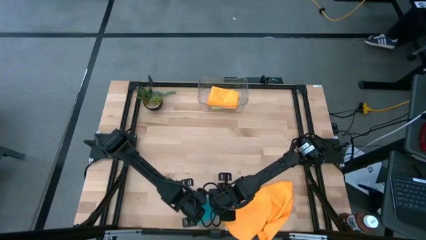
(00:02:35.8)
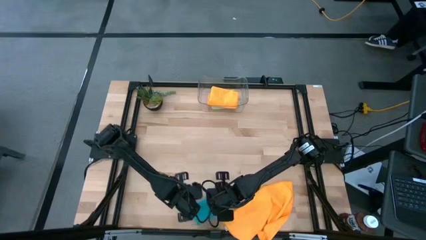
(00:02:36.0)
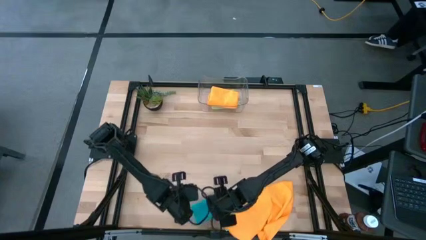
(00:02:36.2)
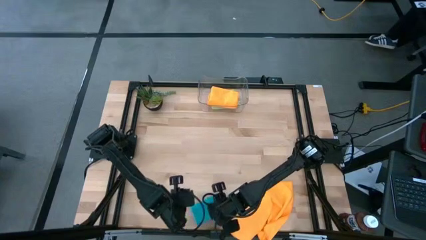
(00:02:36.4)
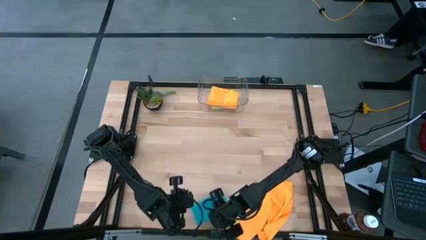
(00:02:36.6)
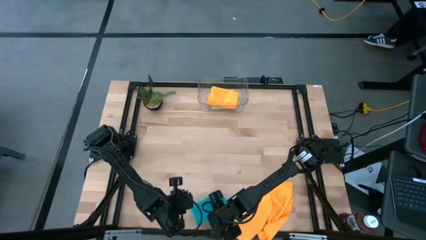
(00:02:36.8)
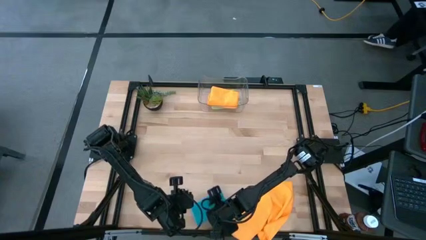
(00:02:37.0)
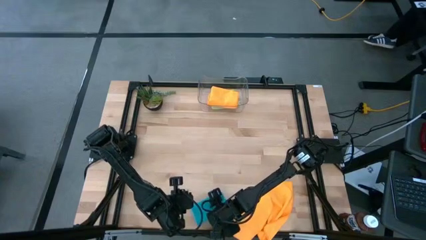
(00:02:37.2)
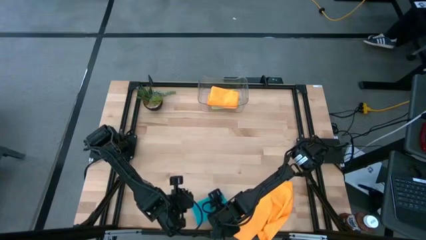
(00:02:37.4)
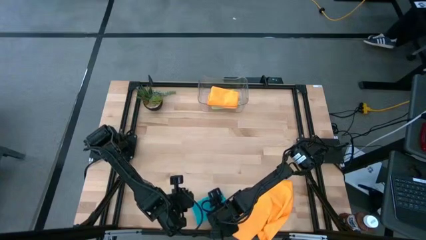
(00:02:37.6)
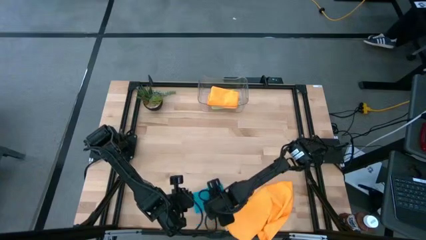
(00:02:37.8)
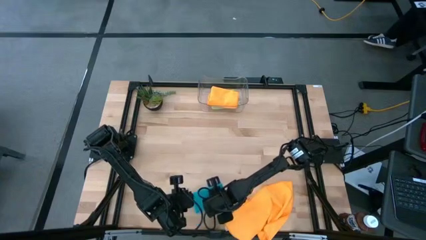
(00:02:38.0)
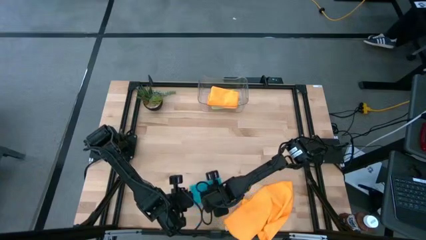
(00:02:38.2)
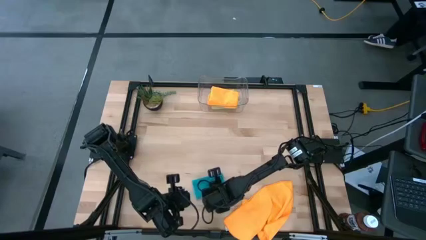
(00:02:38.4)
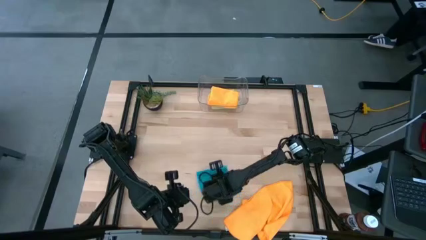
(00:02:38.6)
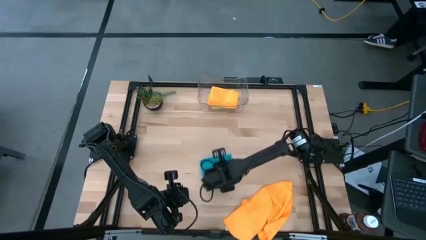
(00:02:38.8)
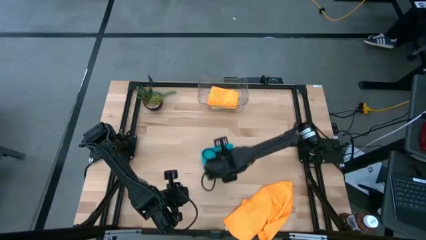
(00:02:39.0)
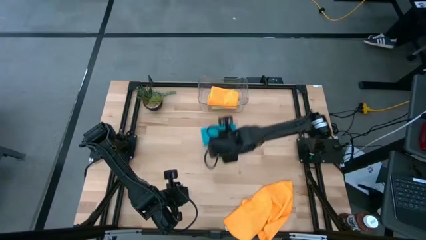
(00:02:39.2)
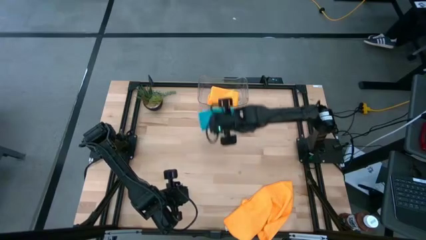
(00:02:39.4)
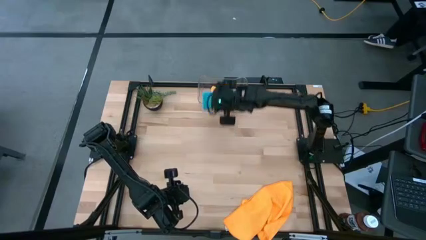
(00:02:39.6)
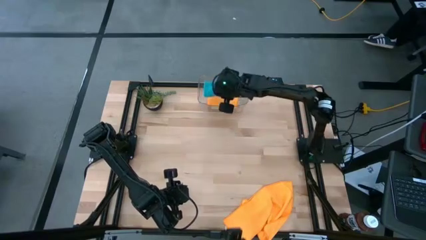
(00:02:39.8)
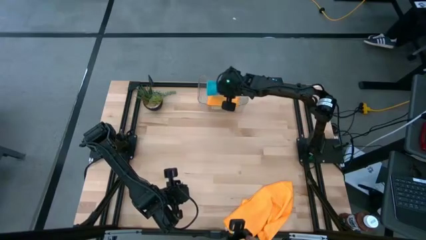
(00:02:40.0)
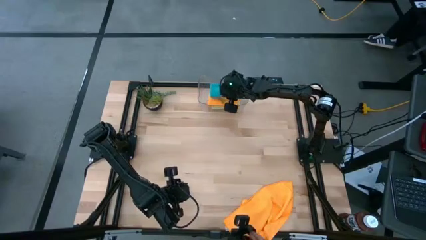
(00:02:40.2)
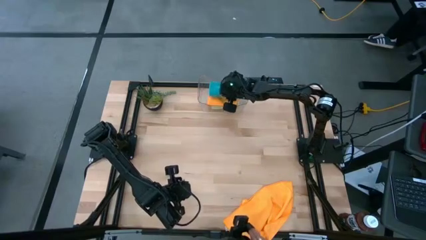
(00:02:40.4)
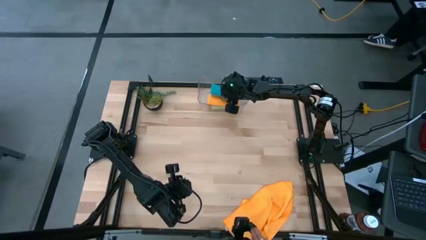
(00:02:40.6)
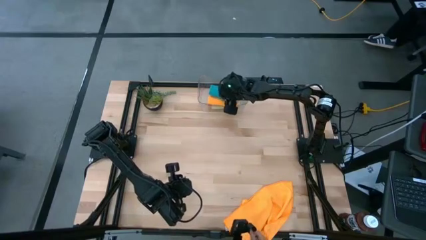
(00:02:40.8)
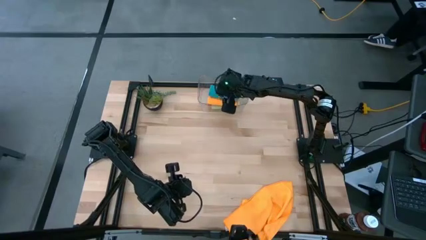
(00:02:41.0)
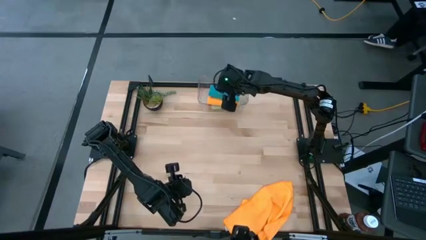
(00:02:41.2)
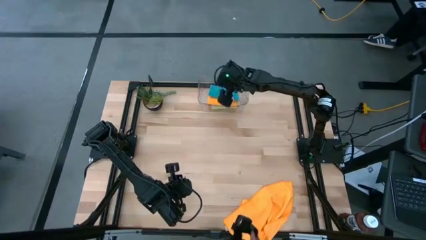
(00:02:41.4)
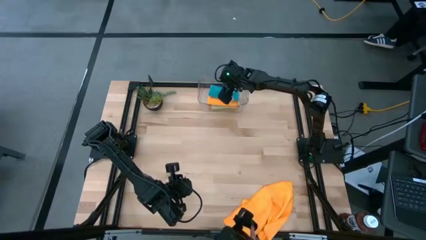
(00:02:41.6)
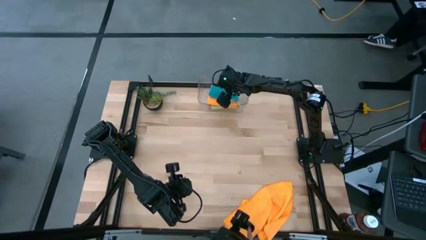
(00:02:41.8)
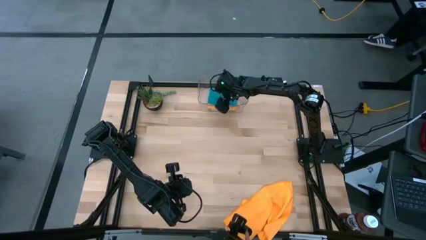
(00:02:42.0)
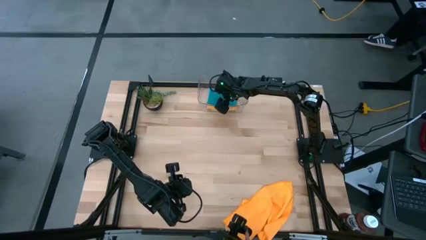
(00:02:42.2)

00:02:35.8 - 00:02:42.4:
Task: Fold microfiber towels
Put the blue microfiber cloth into the transparent bin

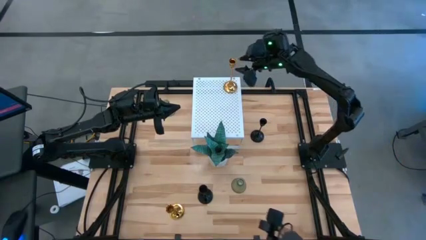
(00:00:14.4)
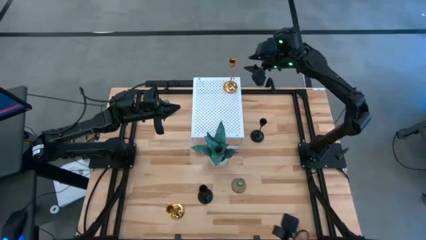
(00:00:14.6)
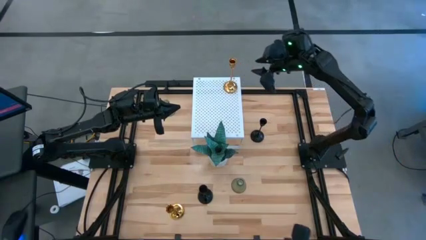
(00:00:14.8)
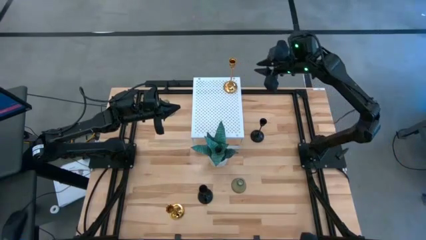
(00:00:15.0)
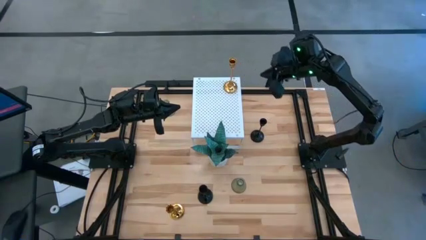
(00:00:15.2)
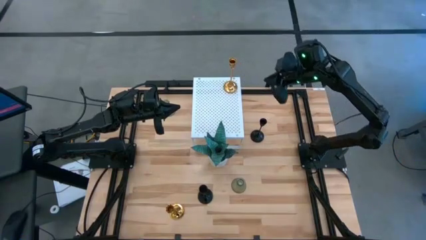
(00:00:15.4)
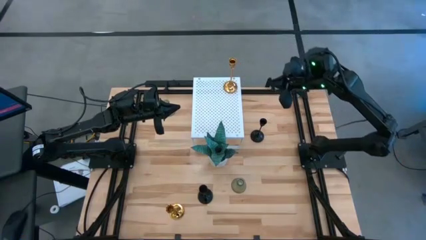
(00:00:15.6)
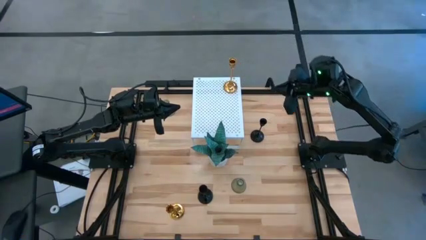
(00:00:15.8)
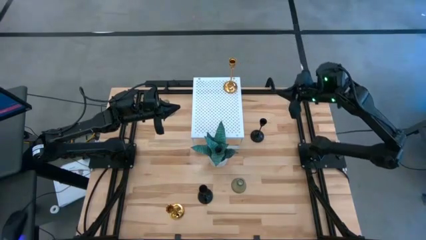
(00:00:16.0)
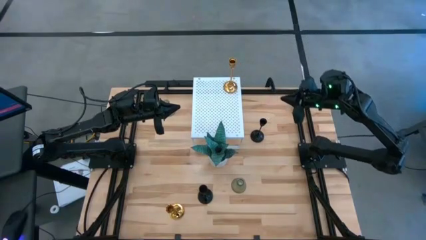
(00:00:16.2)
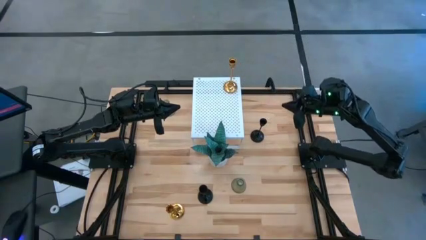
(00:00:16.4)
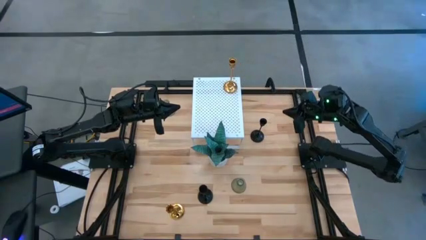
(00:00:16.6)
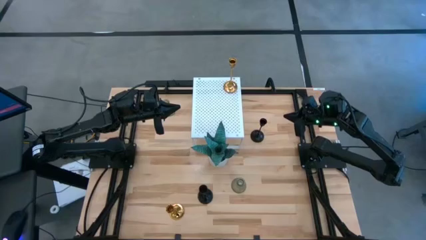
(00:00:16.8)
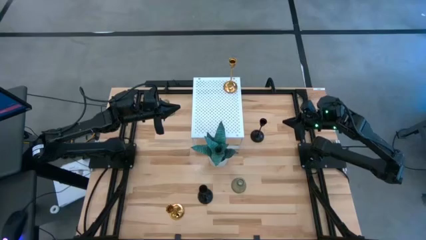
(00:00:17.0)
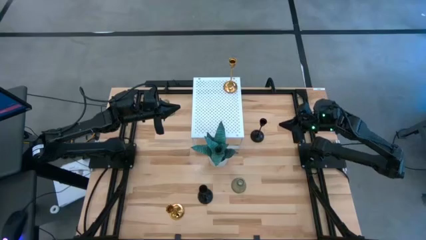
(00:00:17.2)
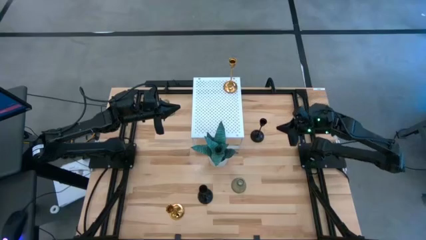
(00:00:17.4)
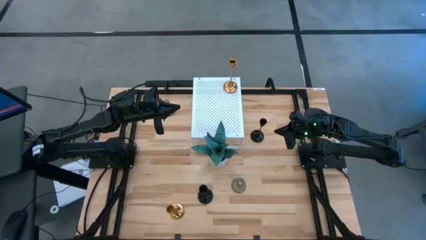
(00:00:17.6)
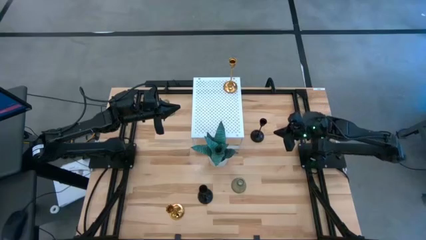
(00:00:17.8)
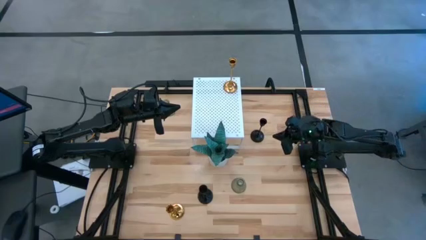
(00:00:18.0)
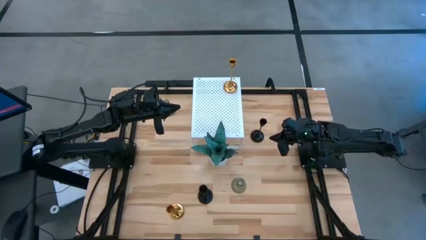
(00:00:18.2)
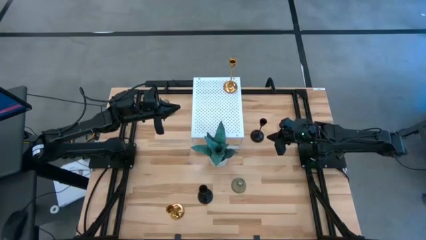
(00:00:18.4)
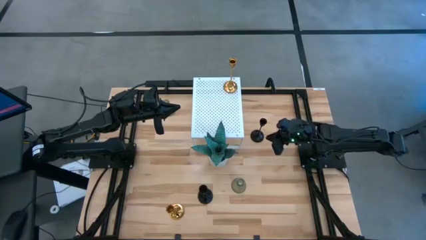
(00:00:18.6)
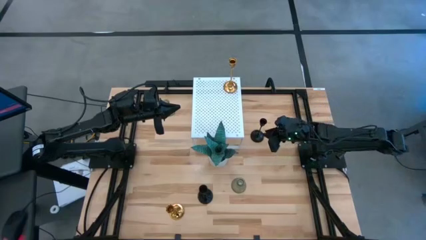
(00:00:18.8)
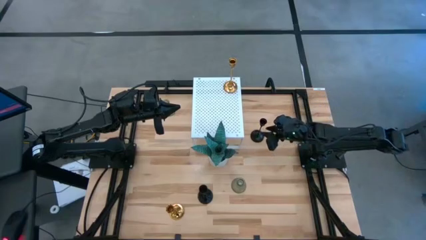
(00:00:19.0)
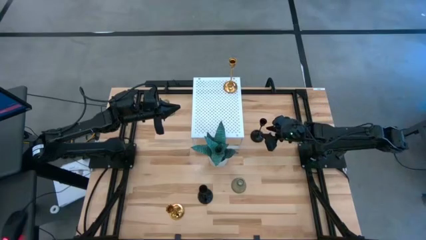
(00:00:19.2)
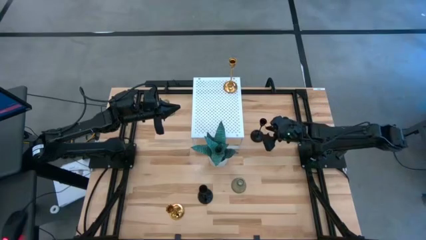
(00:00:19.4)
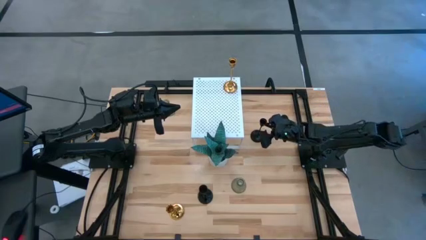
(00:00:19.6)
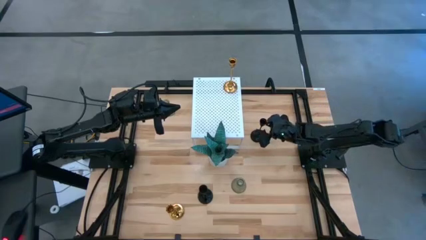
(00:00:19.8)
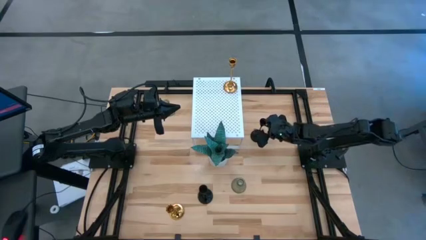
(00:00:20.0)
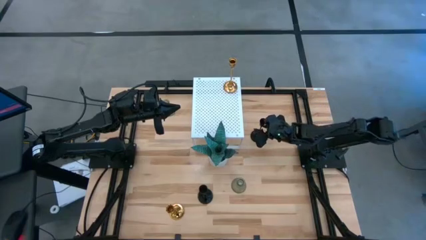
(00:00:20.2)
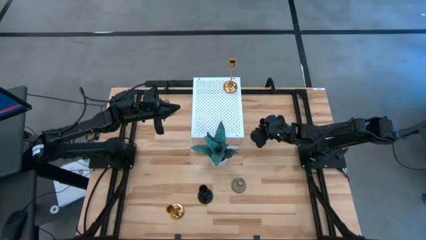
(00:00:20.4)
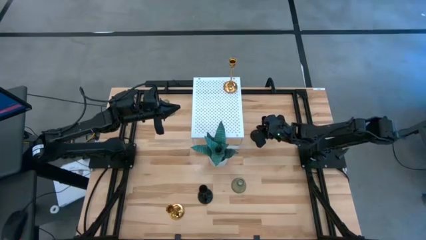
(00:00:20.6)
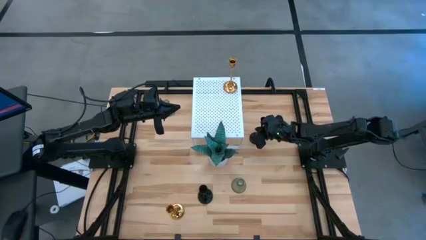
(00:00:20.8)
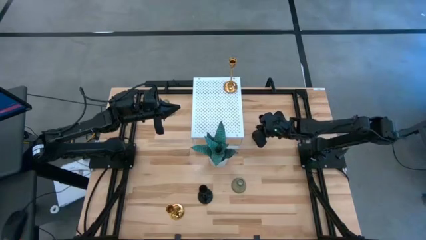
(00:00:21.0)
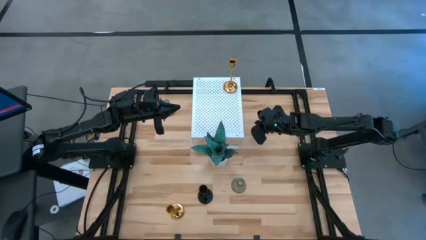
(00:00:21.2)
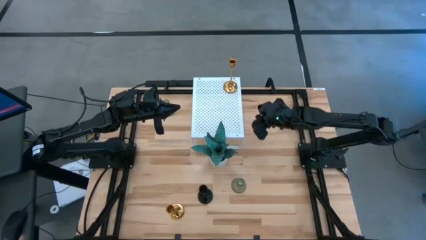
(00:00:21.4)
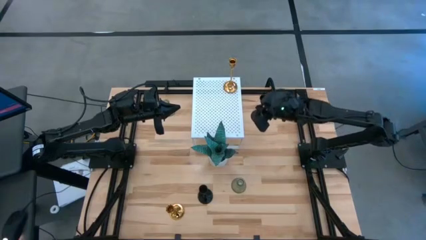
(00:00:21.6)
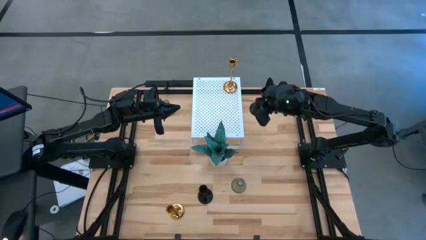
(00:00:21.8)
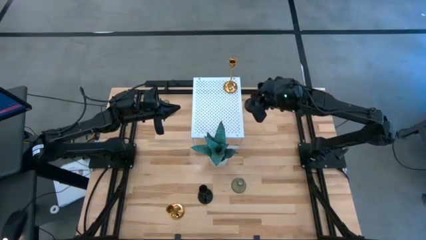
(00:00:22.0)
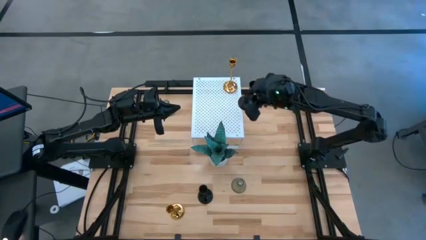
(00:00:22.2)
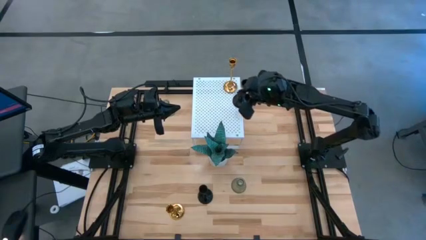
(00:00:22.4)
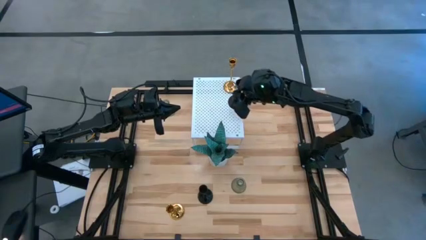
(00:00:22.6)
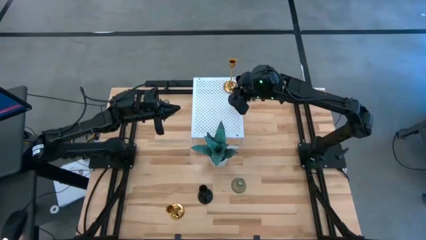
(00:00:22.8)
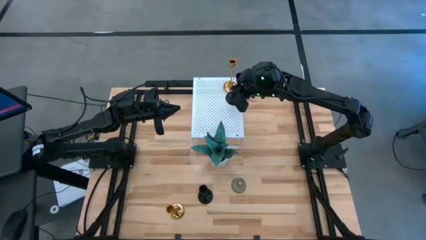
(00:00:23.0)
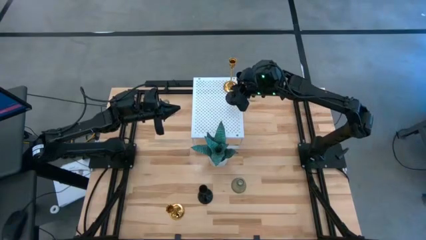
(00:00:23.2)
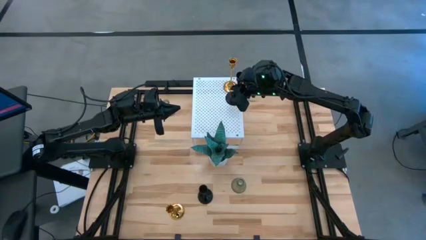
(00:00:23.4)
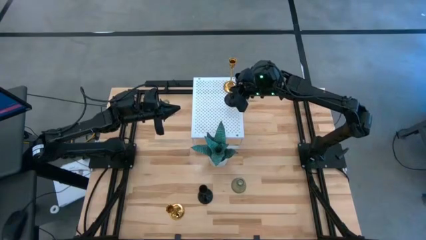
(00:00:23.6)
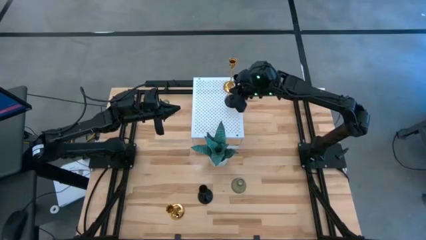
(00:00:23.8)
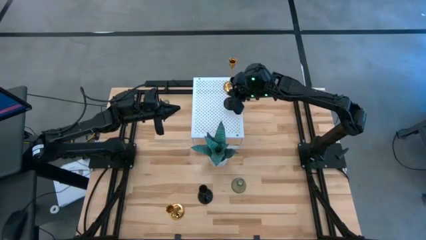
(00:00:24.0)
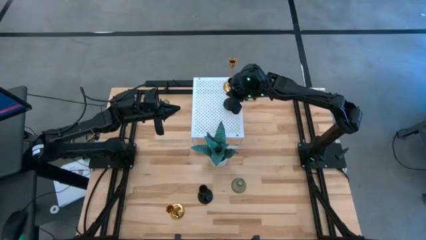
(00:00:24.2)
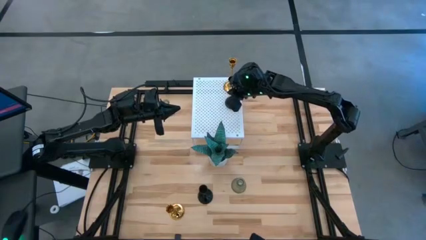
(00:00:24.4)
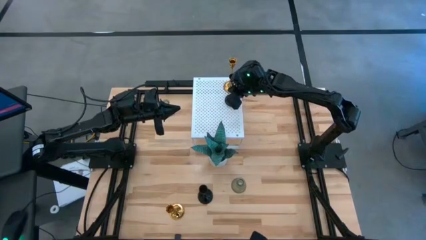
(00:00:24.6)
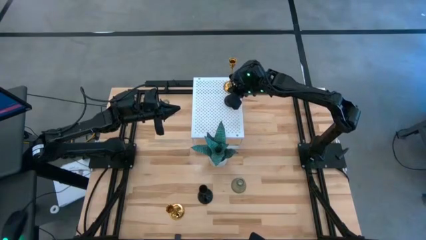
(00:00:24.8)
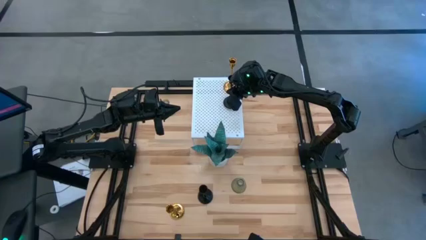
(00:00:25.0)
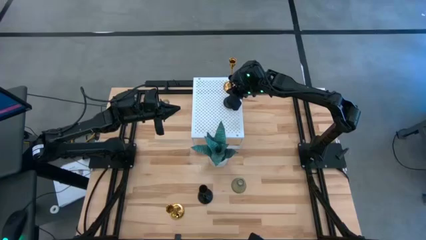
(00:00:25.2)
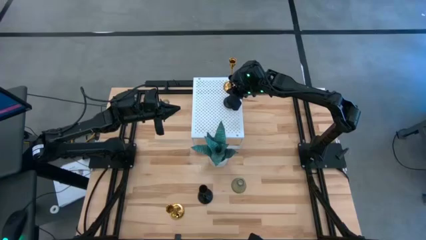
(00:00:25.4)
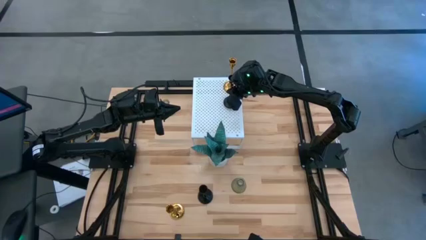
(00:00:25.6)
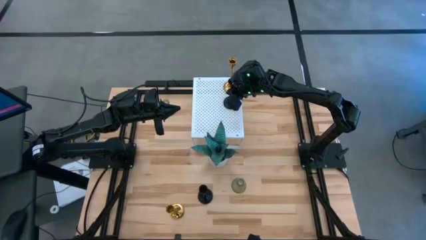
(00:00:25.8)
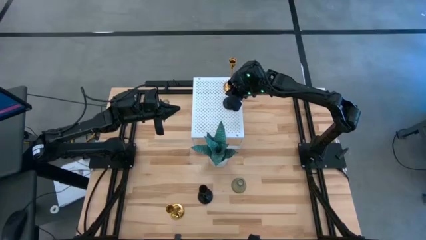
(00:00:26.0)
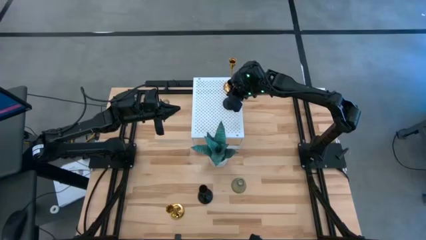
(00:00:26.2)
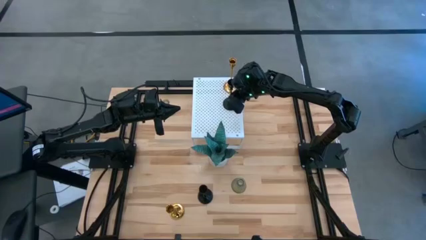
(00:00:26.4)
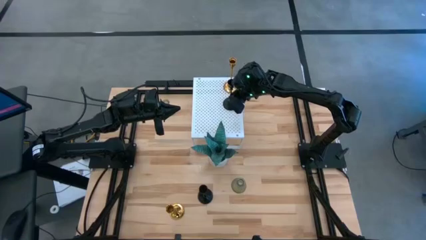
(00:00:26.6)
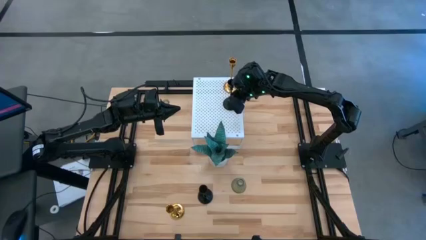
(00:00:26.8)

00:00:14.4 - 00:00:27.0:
Task: Pick & Place candle stick holders
Put the top black candle holder on the shelf
